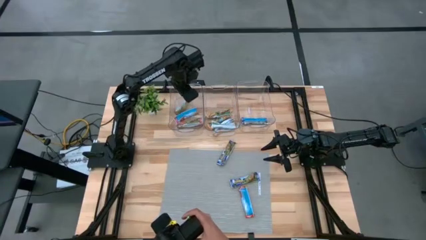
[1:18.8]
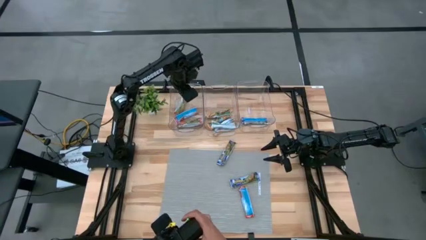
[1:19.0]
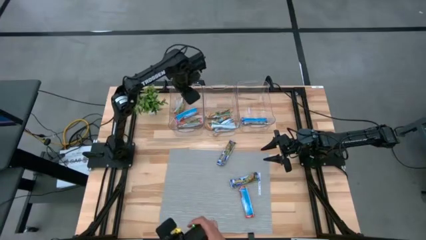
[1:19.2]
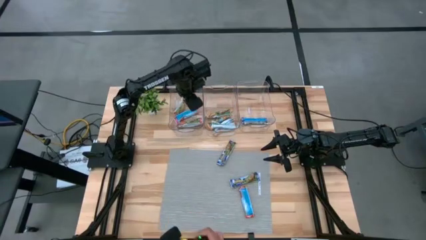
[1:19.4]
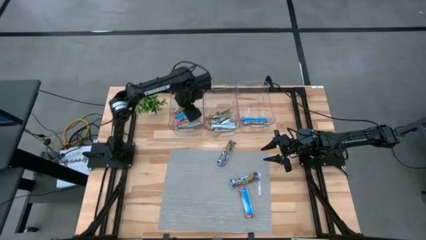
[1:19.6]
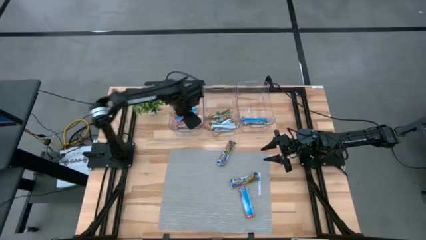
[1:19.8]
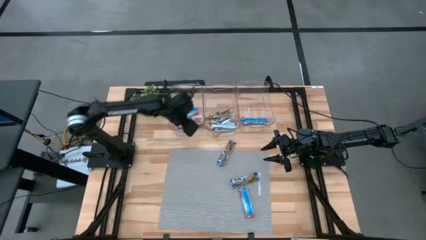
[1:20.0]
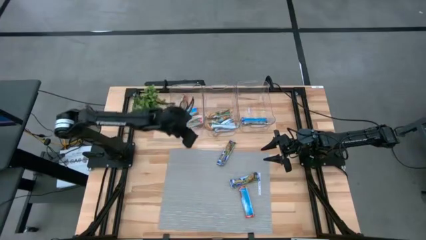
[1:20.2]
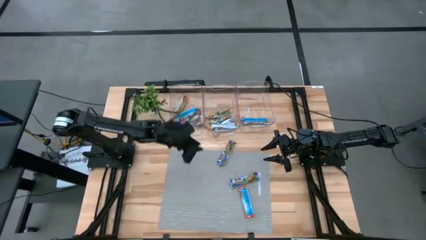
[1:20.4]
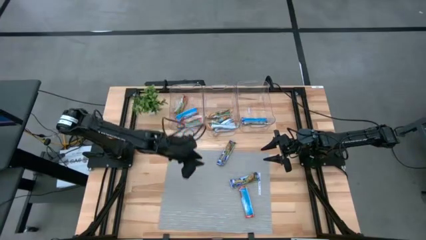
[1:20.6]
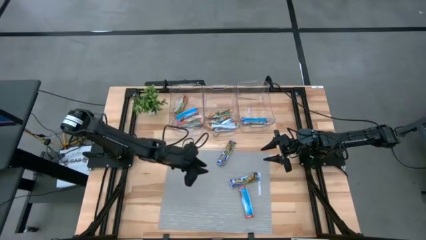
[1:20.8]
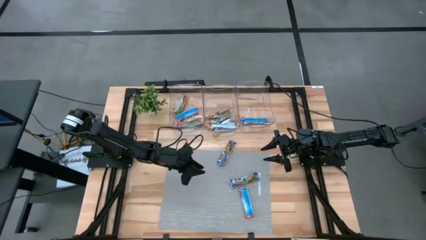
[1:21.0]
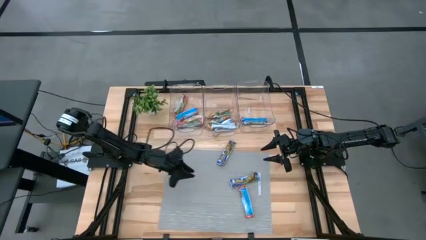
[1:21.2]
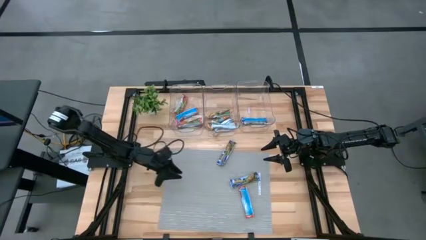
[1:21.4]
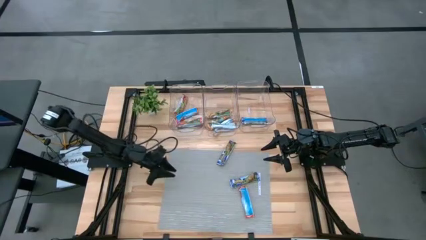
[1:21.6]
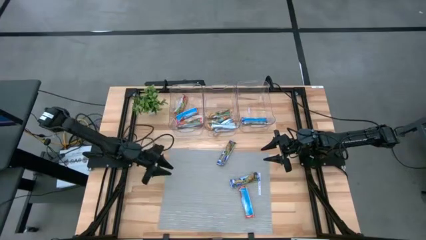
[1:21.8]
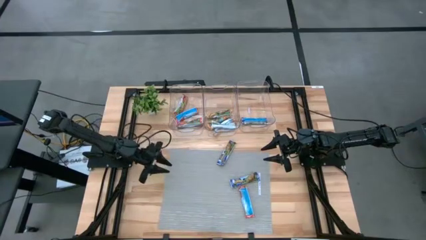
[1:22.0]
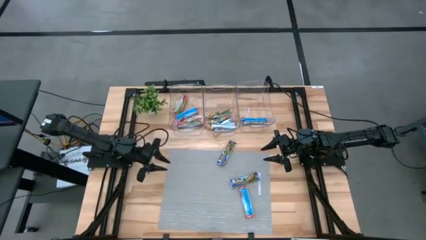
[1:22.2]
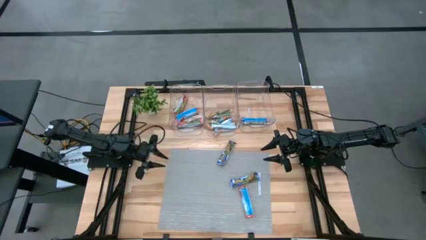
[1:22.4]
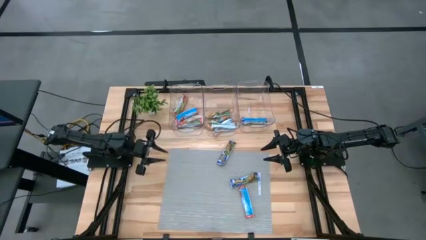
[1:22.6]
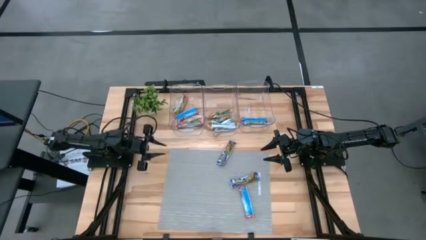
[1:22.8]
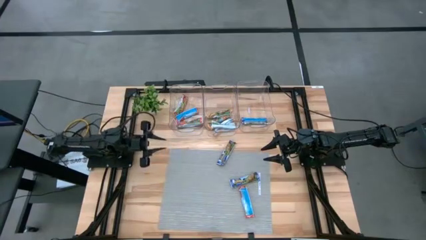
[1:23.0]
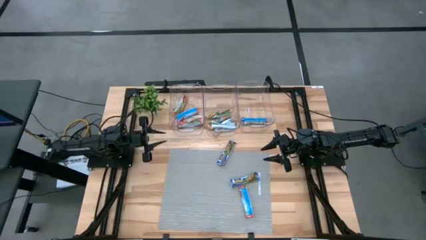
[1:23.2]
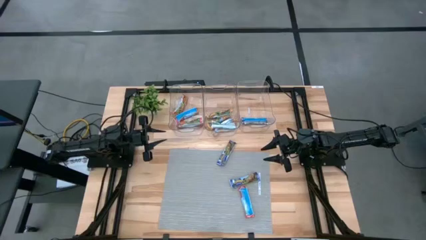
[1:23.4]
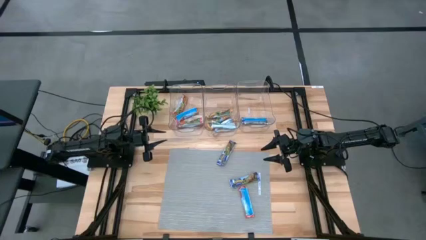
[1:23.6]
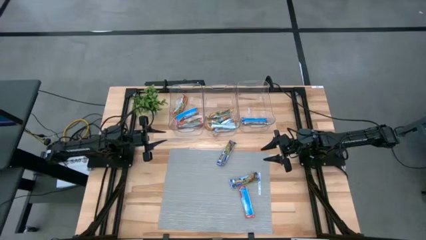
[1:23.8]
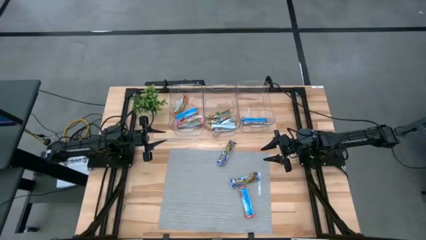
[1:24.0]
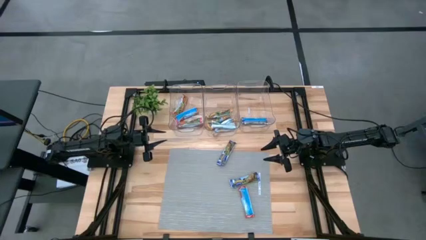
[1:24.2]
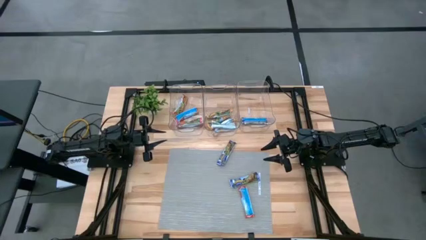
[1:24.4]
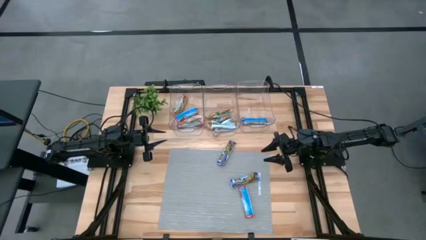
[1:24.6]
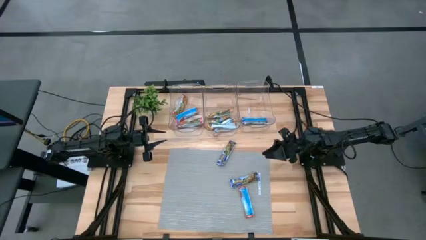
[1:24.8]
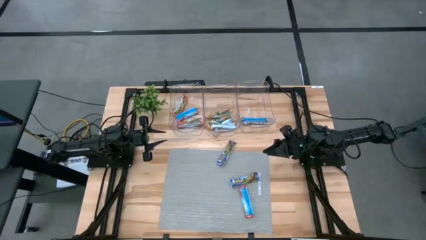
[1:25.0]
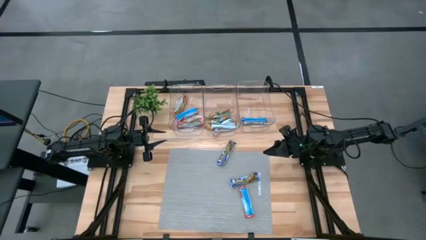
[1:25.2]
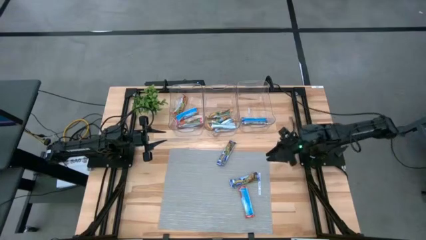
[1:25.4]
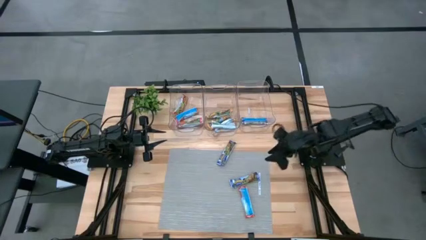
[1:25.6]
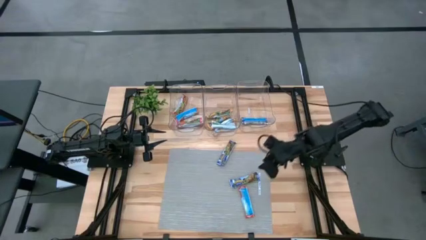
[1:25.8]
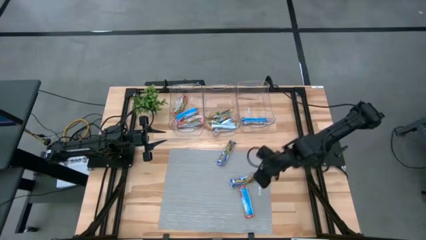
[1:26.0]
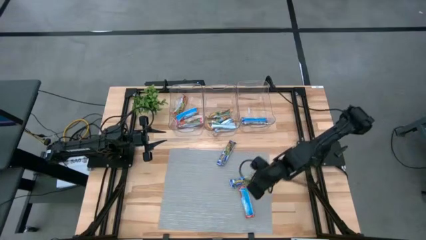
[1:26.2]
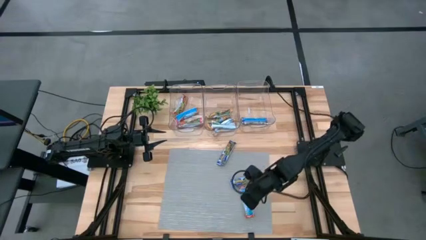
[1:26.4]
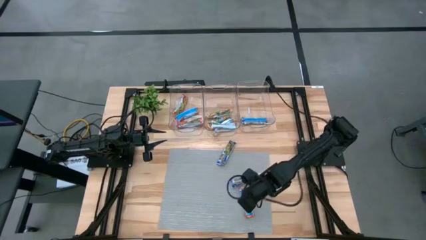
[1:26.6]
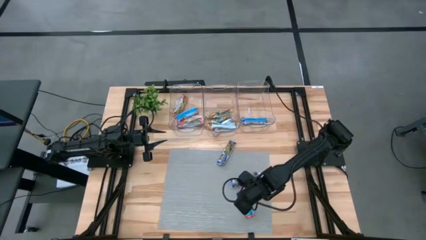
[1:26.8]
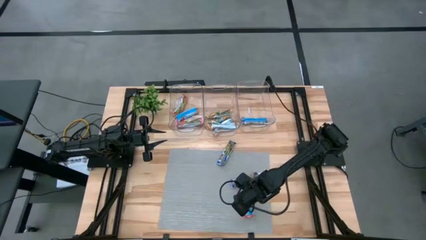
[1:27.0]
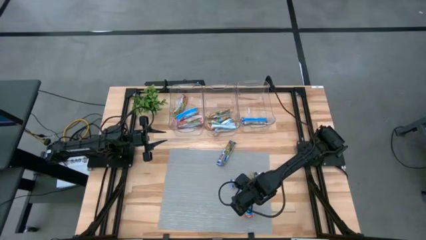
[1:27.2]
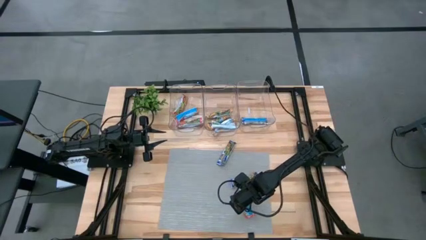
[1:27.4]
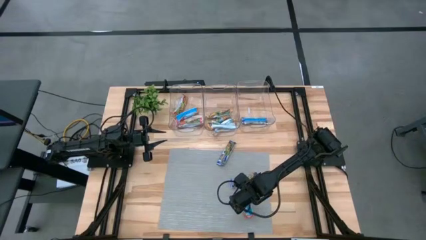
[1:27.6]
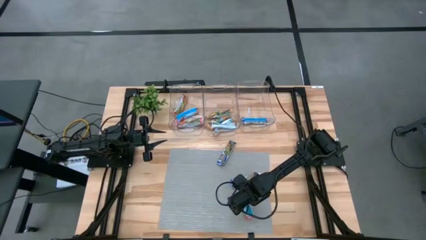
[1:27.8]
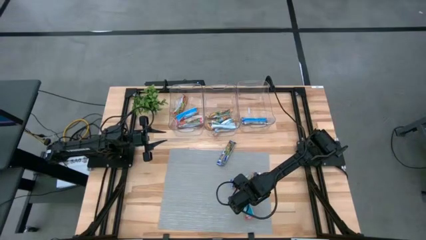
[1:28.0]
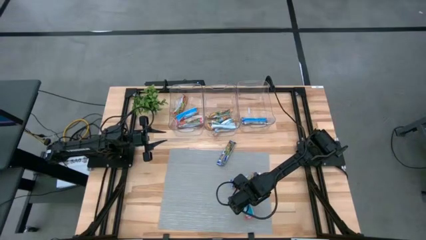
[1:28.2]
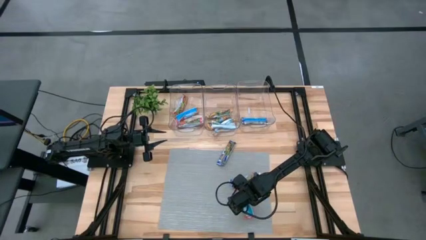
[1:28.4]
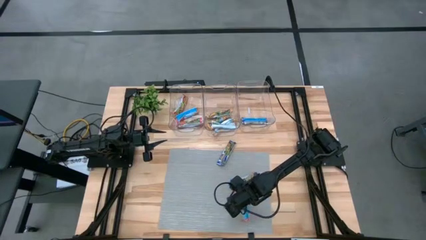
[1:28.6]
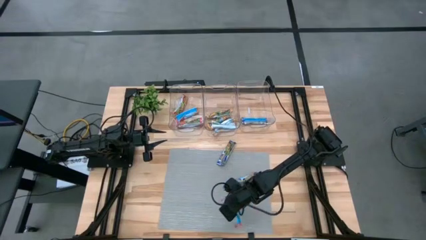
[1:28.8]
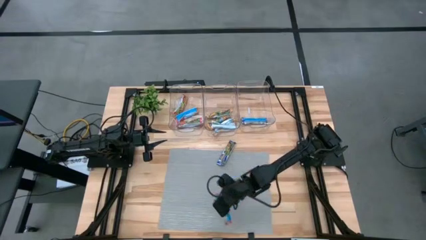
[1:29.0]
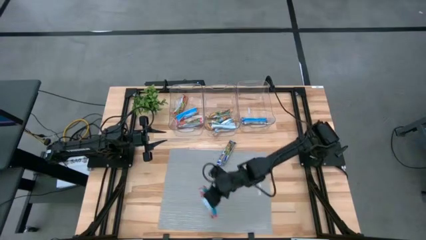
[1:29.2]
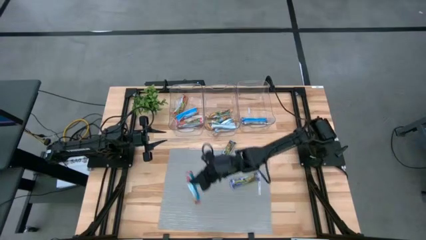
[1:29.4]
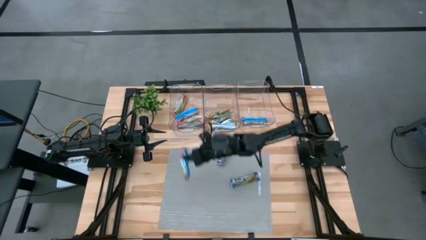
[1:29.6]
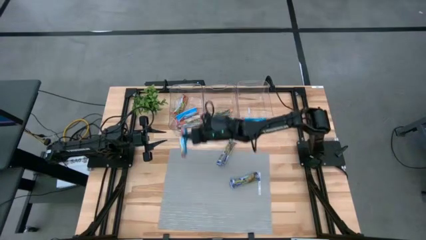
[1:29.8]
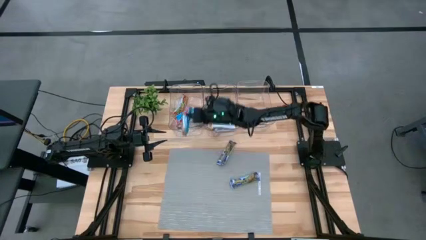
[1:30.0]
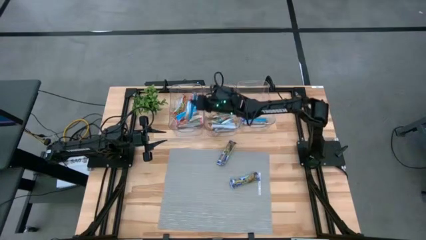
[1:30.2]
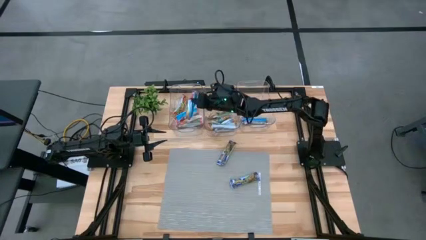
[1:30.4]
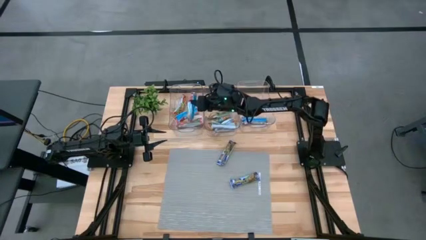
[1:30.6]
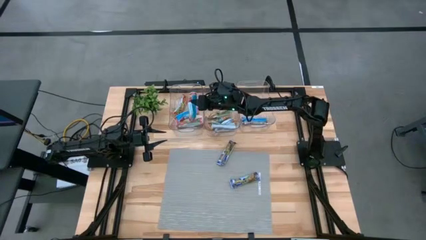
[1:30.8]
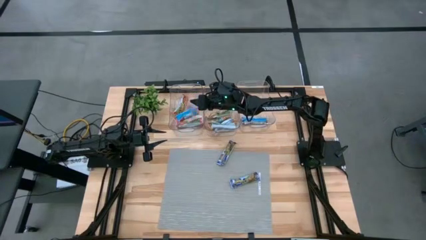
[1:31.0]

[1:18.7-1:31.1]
Task: Pick and place Granola Bars by type
Put the red granola bar into the left transparent bin

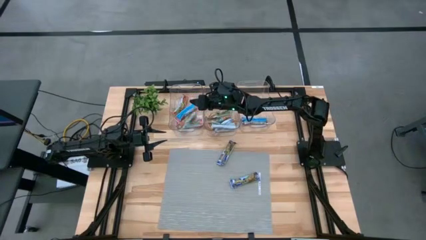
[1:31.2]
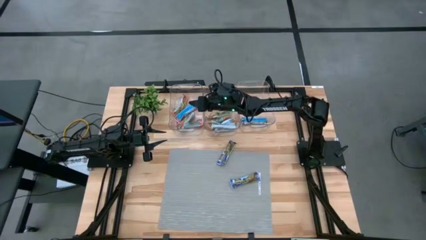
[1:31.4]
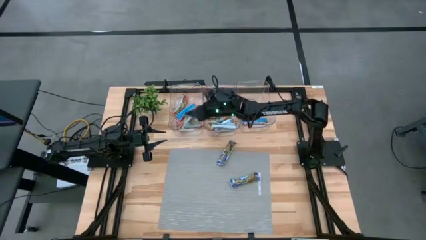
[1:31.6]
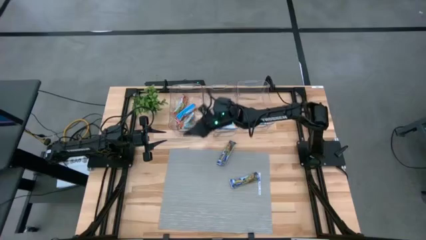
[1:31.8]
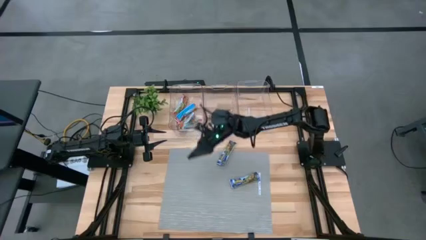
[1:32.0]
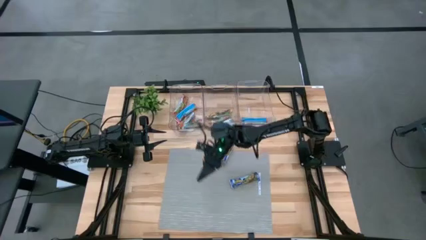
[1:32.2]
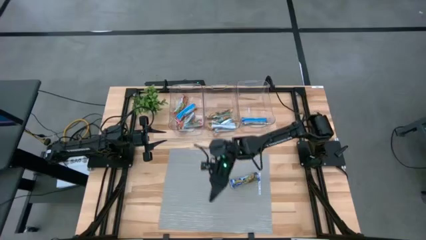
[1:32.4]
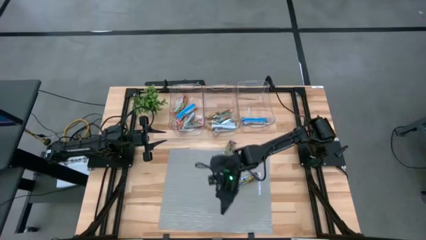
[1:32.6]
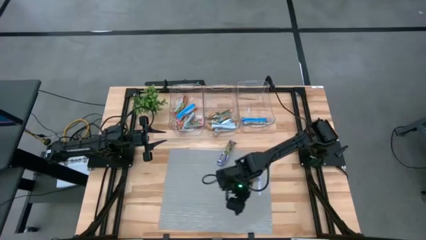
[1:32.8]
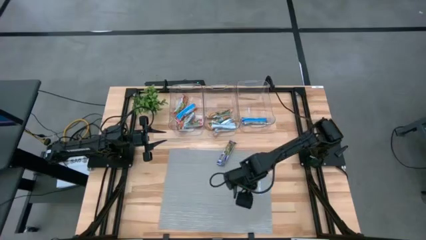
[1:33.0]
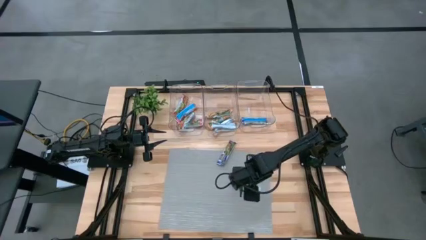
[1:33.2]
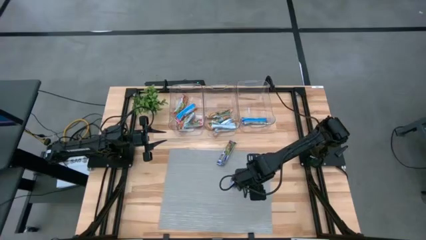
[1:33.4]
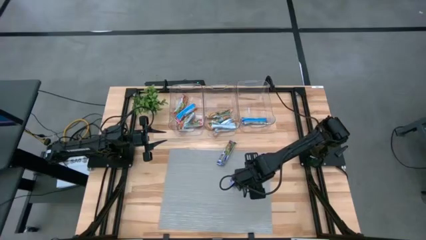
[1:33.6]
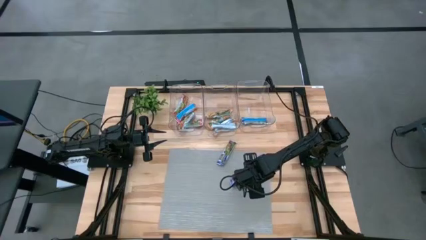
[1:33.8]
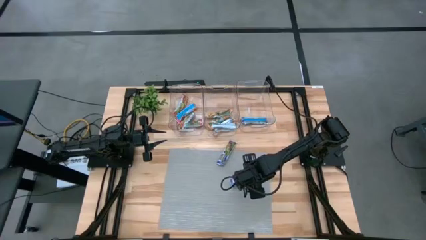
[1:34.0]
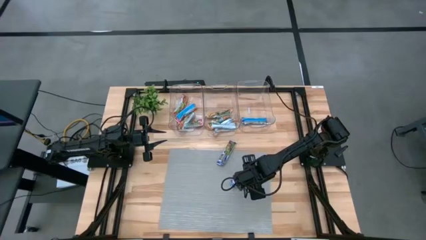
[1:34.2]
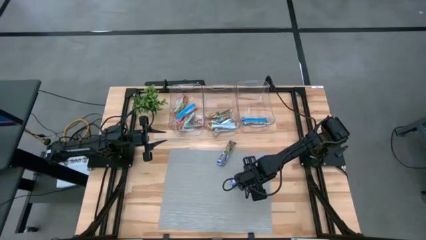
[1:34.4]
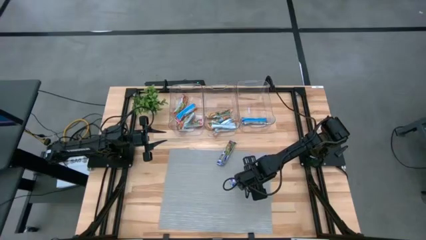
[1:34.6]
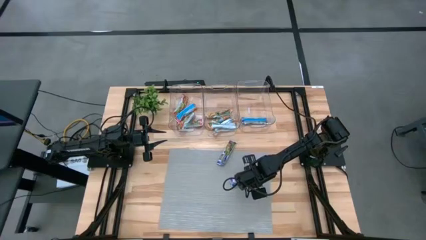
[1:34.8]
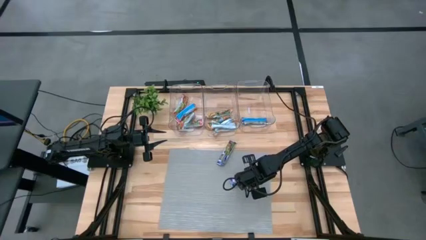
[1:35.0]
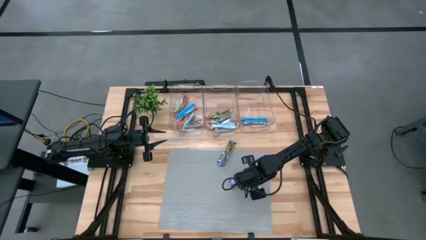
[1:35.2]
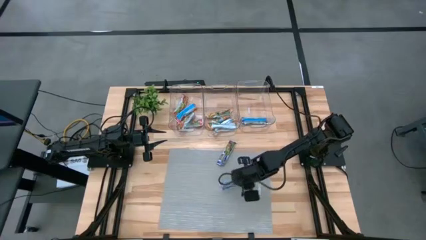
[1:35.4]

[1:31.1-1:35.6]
Put the blue granola bar into the right transparent bin
